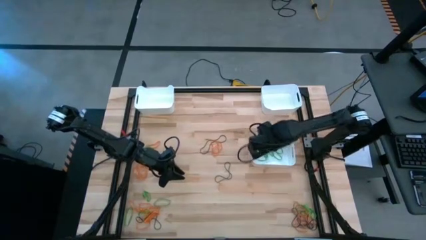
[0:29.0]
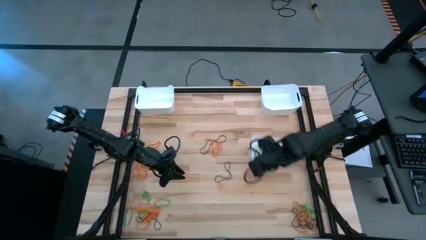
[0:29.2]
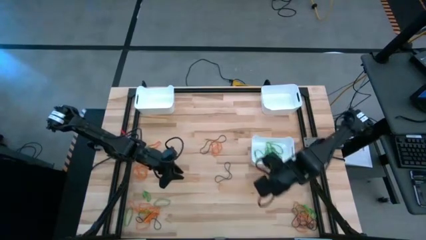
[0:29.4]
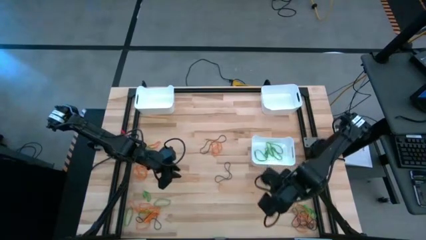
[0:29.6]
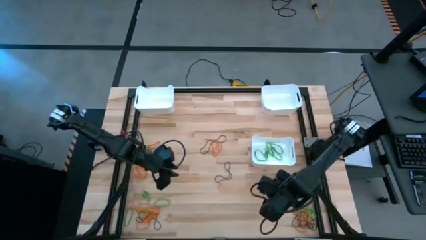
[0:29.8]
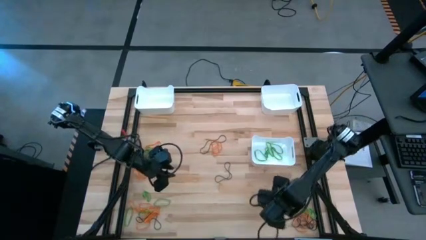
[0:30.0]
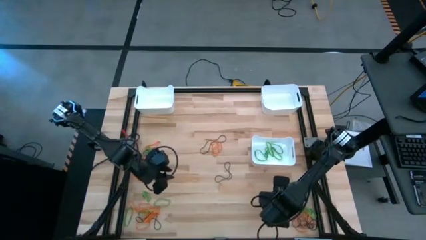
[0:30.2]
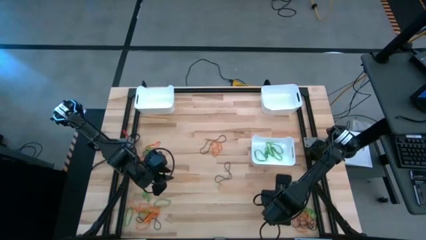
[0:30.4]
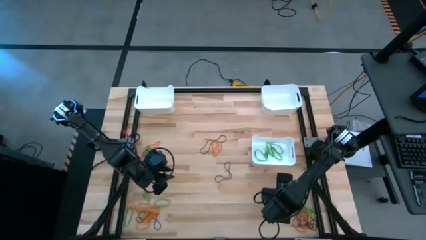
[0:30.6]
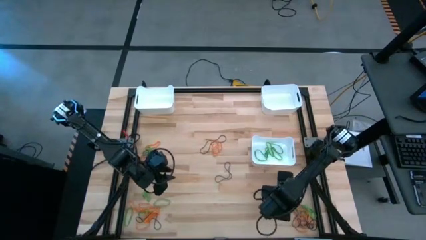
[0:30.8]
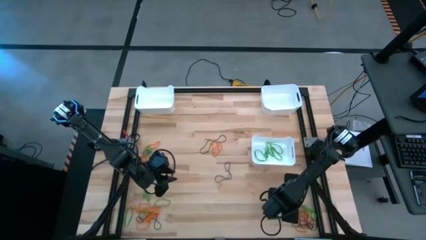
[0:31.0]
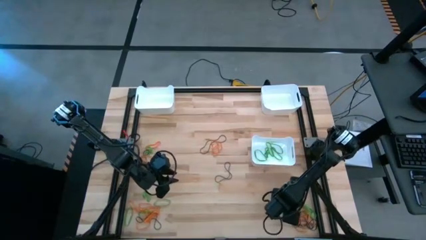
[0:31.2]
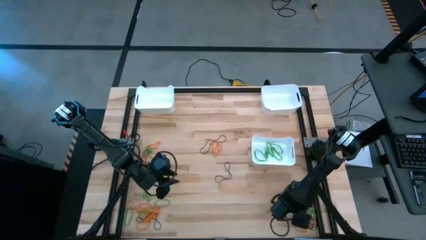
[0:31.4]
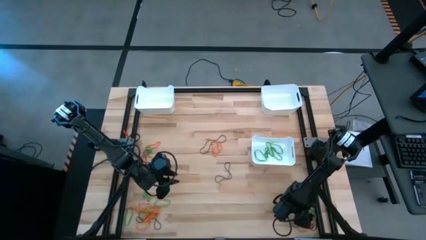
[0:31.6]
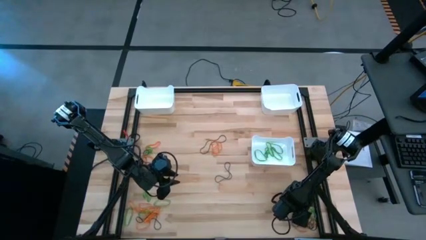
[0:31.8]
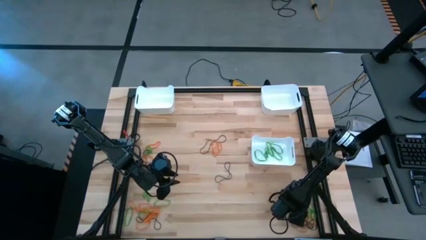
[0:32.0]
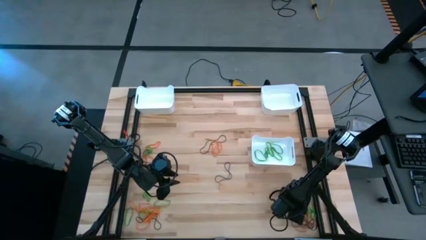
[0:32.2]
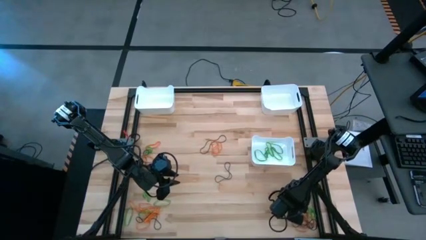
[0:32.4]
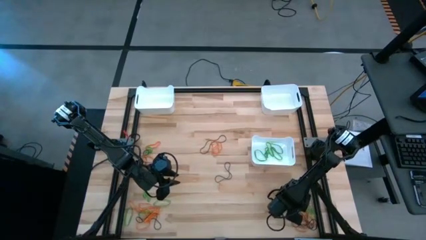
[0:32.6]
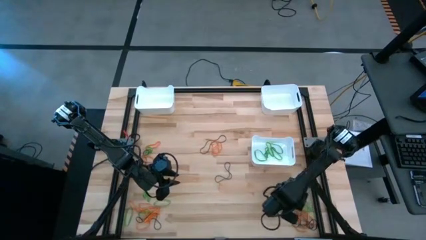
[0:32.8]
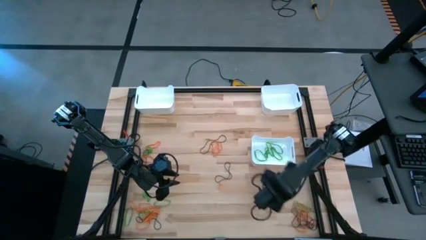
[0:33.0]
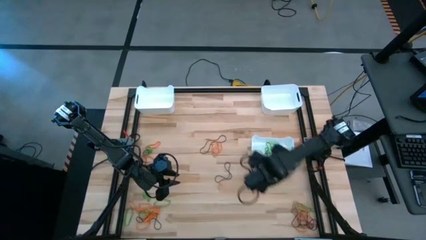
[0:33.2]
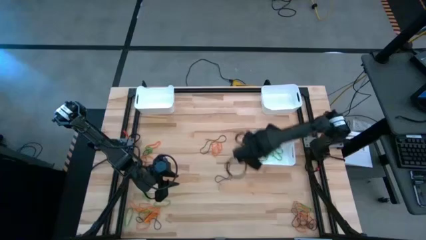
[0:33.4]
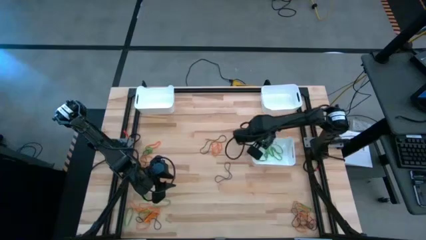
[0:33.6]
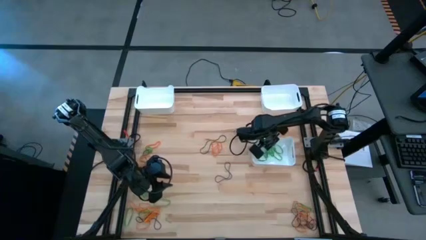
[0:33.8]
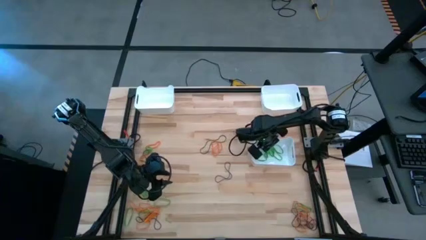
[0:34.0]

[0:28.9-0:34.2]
Task: Sort rubber bands into baskets
Put the green rubber band into the bottom white bin

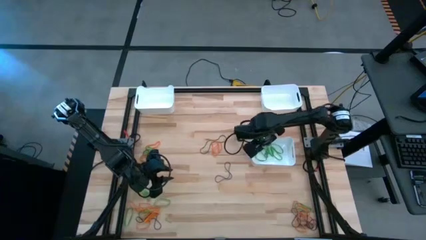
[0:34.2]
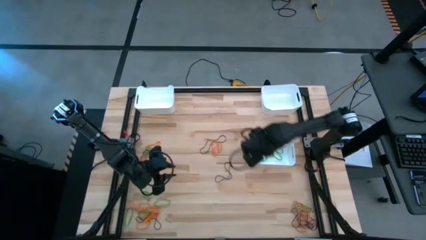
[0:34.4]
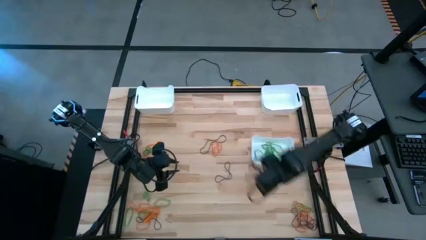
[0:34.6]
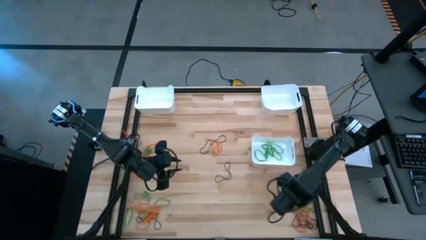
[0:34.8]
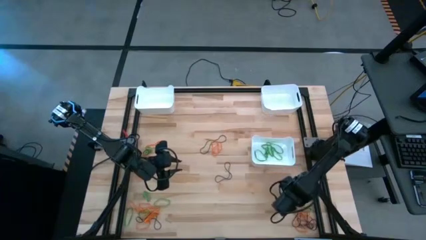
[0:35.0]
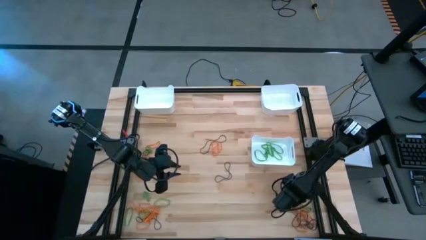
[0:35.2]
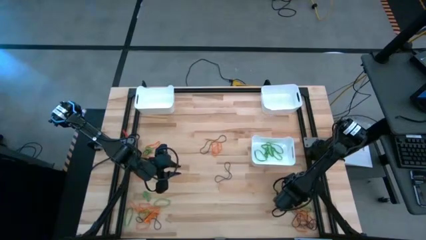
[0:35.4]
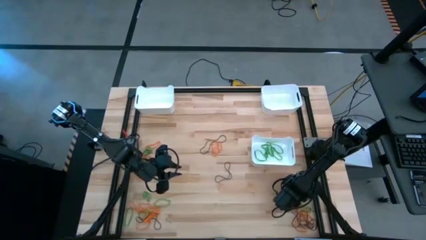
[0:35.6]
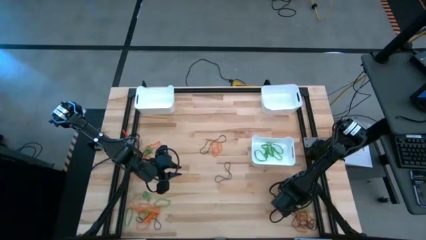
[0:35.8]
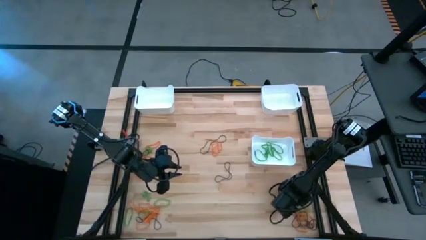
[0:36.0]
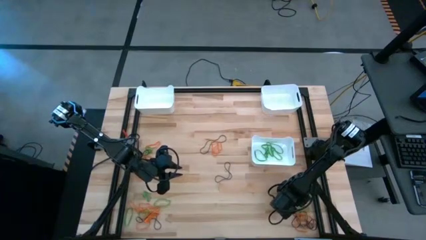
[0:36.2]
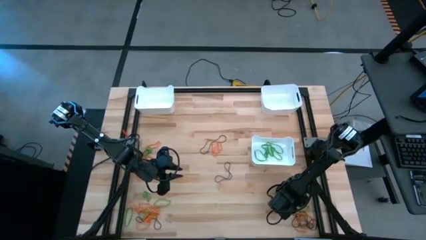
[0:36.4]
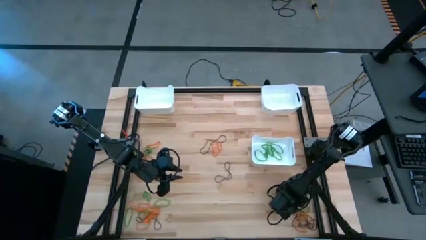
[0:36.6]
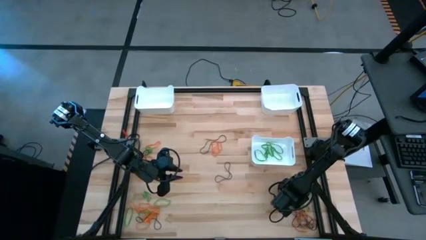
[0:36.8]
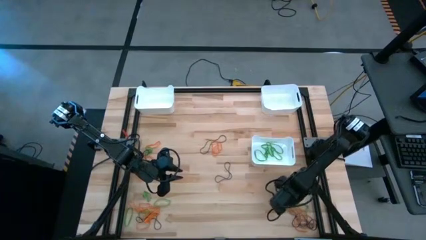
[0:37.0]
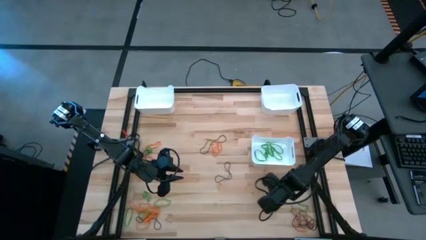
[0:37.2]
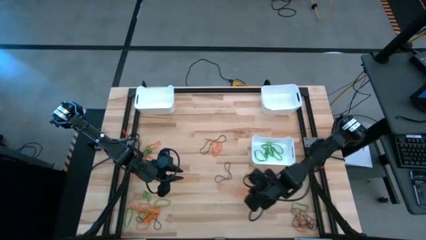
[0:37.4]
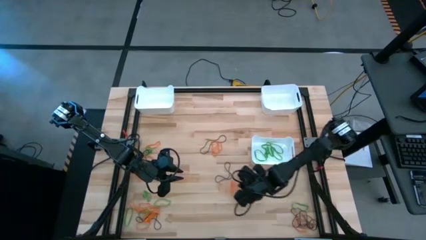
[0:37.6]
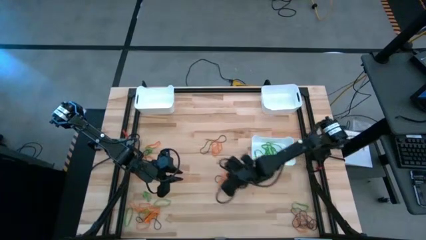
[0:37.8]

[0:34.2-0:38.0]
Move the orange rubber bands to the center of the table

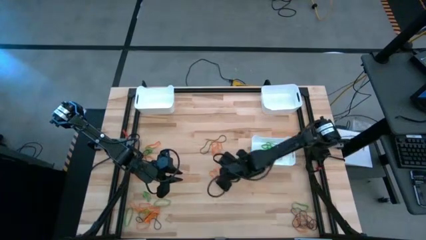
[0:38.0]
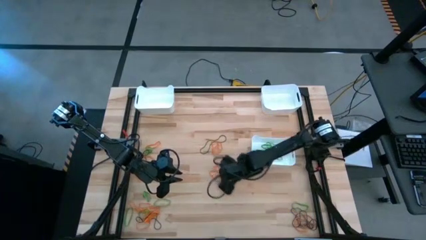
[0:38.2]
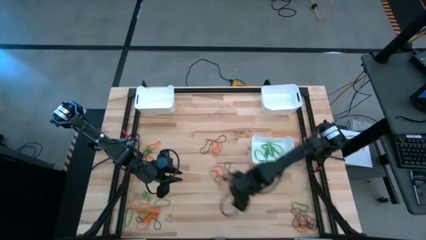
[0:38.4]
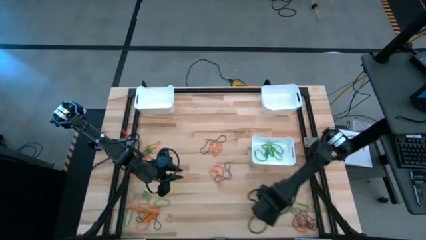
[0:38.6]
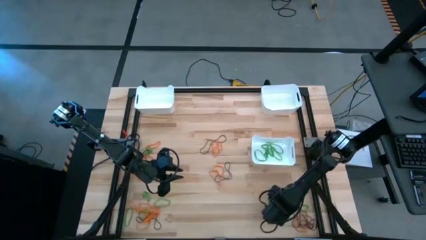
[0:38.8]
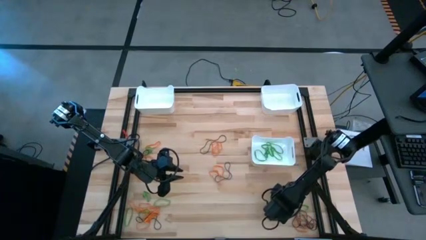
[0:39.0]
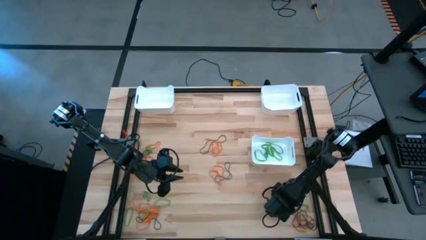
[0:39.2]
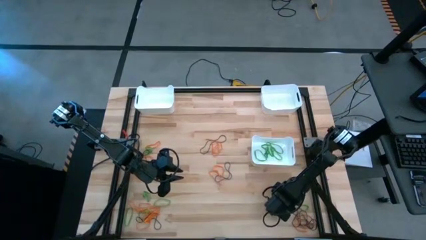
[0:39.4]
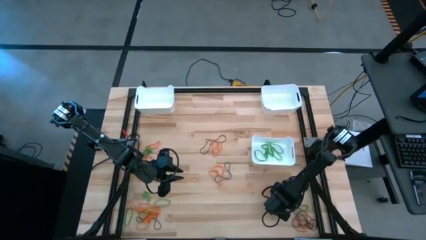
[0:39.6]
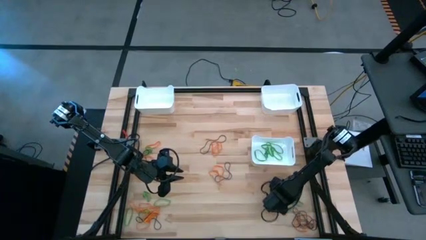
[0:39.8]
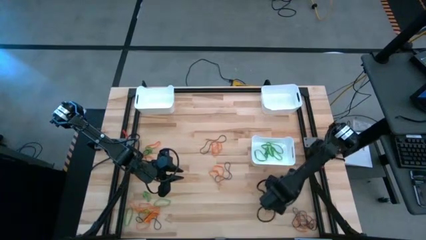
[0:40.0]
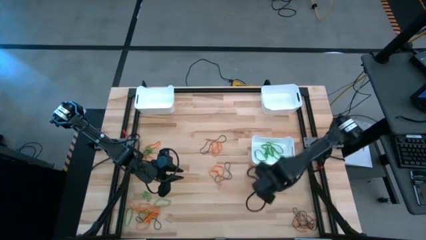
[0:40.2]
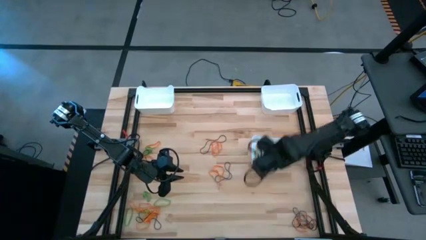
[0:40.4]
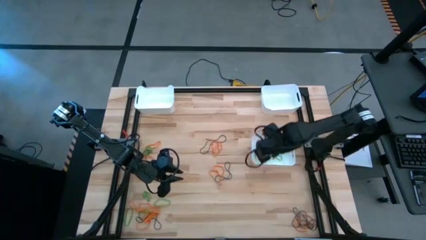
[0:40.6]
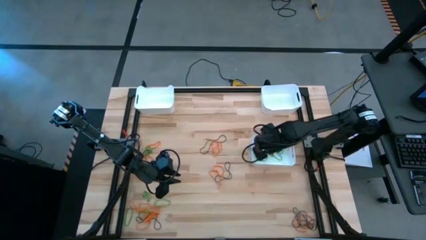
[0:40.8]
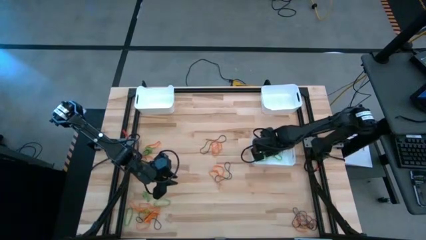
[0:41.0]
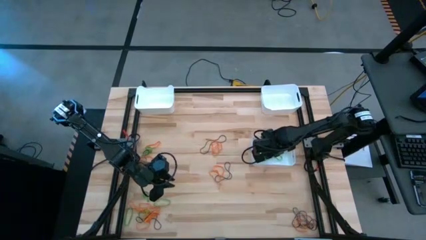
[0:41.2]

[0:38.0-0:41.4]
Put the green rubber band into the bottom white bin

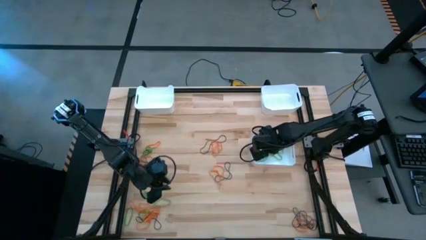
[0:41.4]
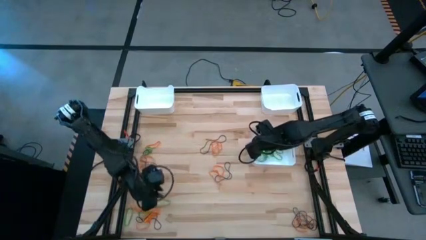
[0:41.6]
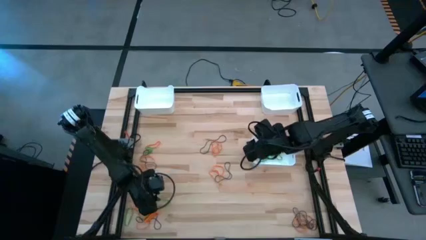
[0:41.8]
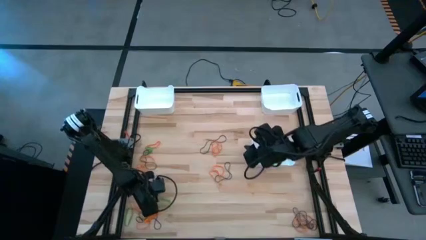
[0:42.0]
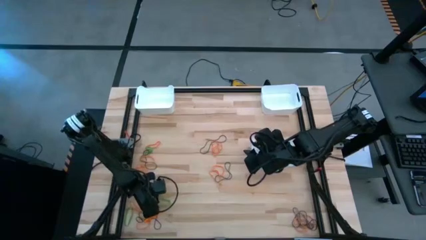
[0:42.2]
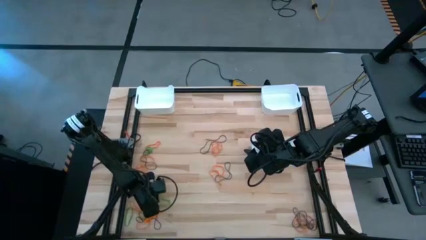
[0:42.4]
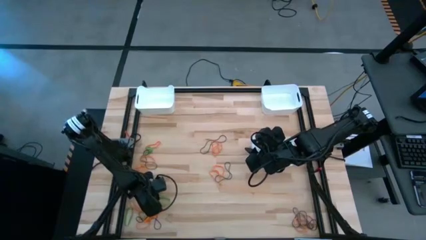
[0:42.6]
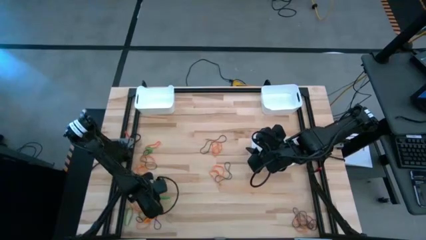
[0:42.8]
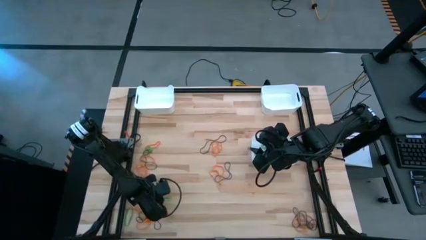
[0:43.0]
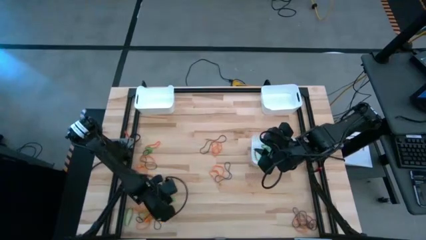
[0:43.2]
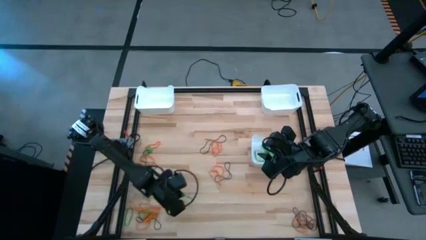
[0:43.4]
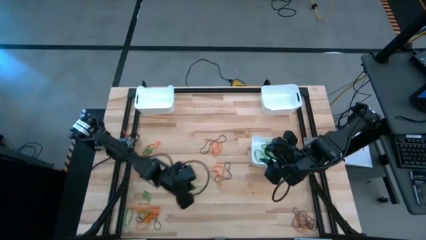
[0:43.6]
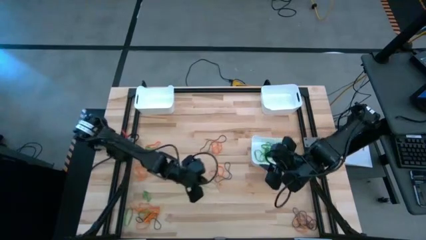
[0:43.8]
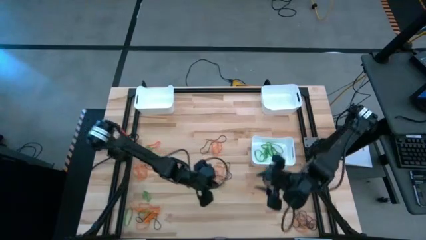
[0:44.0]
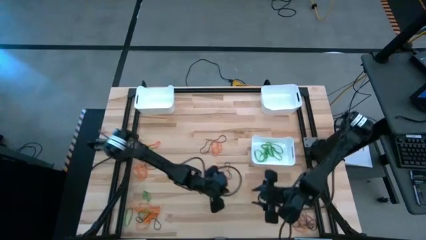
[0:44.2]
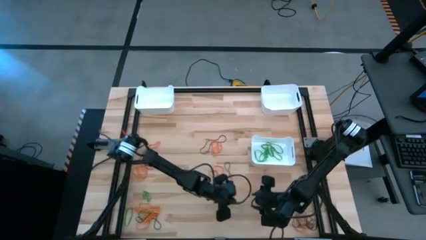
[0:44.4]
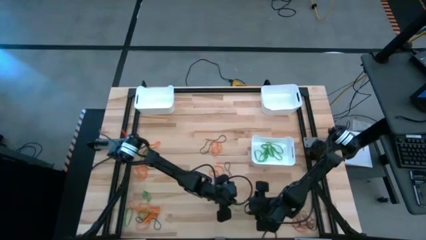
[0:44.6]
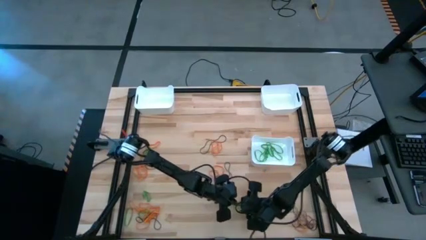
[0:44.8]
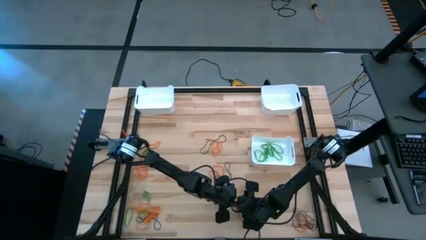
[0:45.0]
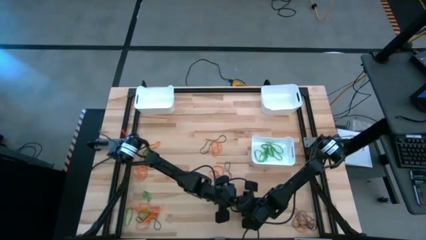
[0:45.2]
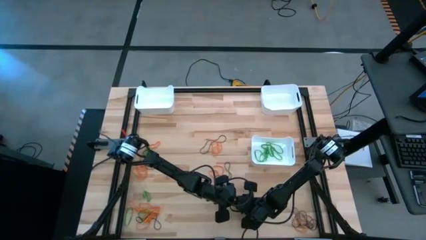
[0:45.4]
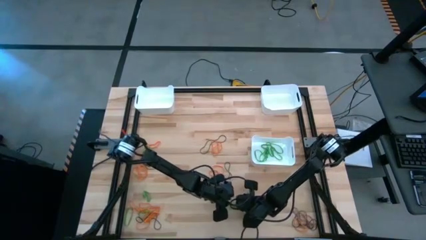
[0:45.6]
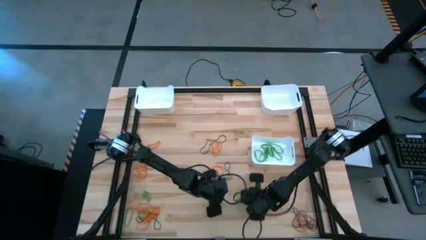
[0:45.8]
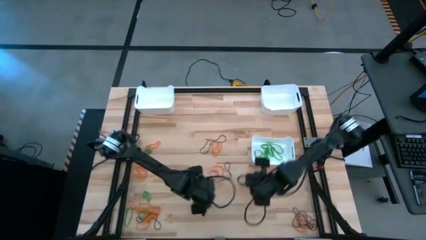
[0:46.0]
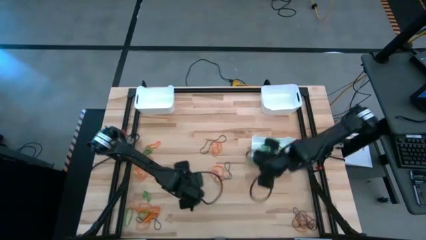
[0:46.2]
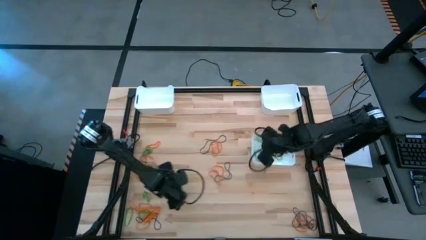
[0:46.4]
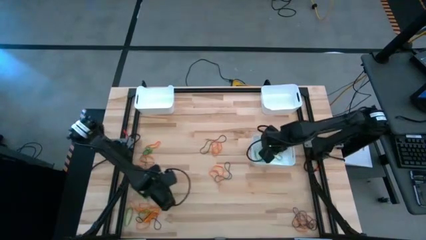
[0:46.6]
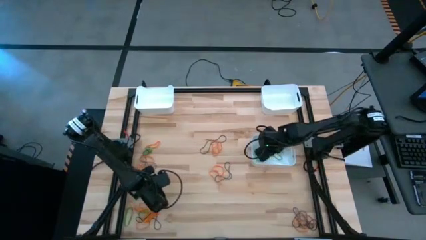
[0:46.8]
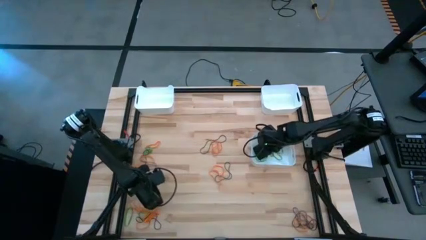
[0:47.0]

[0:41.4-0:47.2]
Put the green rubber band into the bottom white bin
